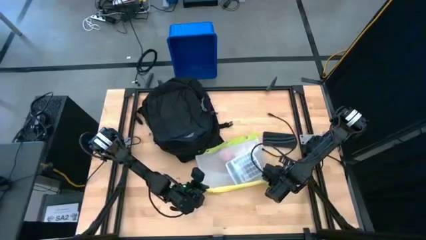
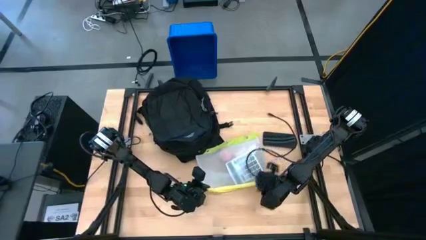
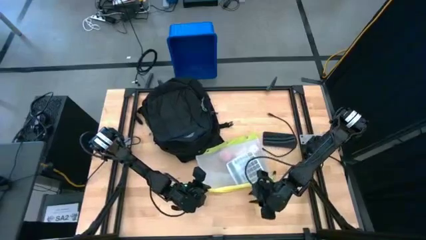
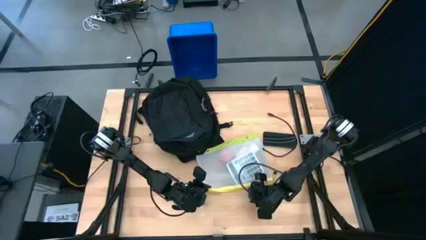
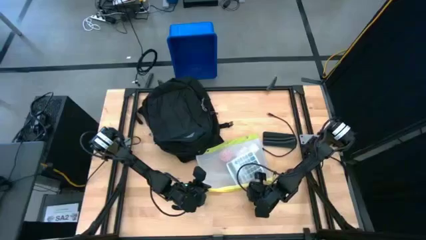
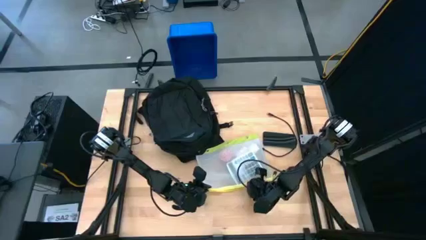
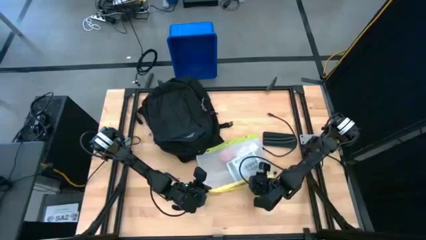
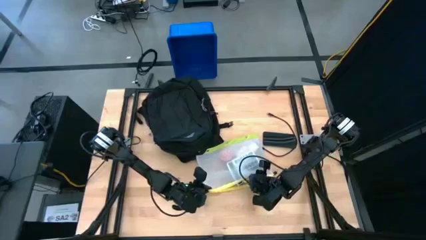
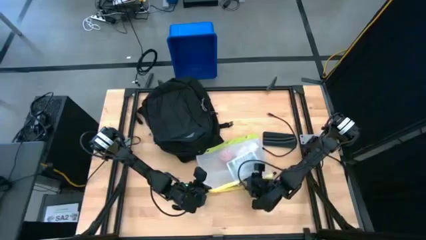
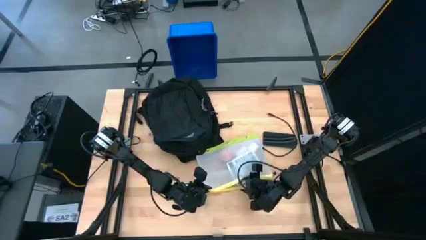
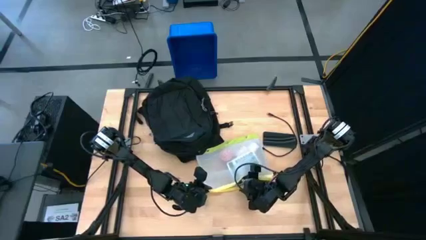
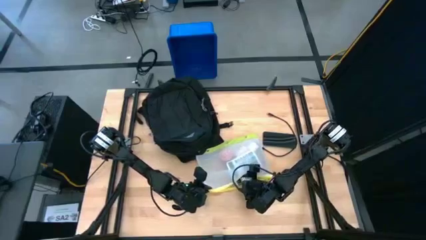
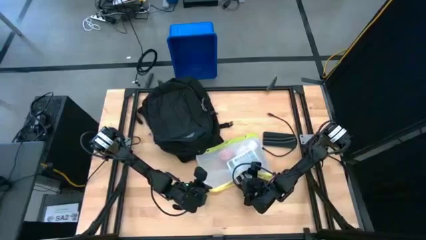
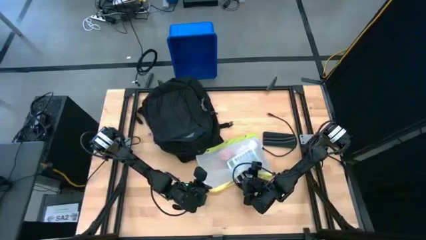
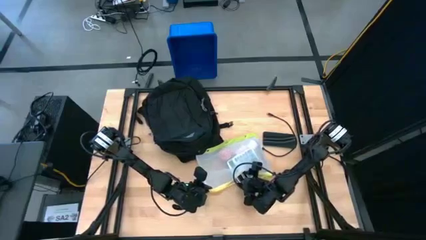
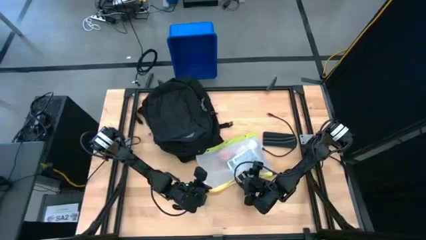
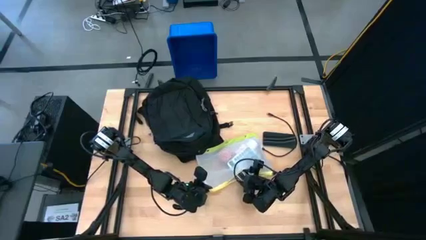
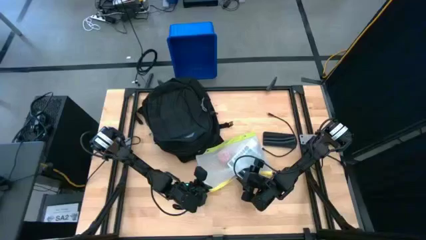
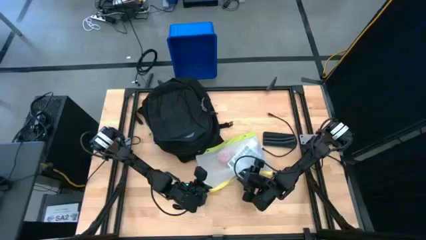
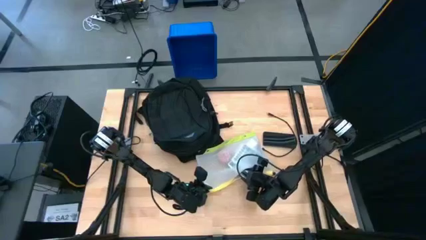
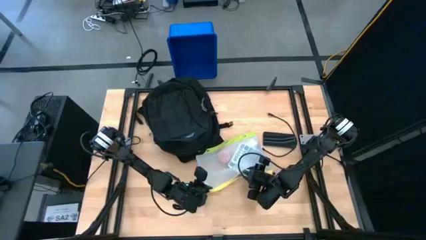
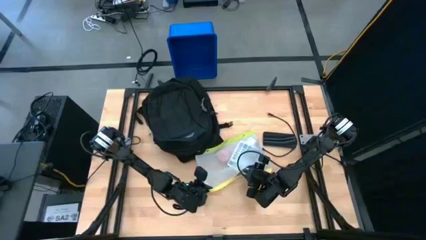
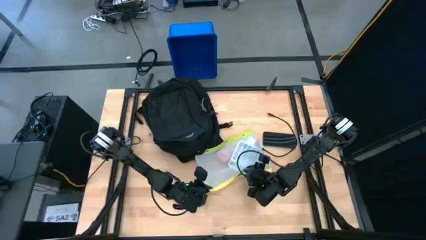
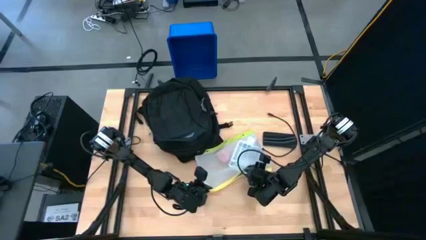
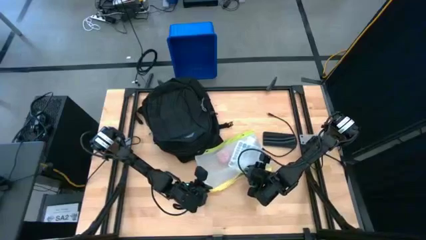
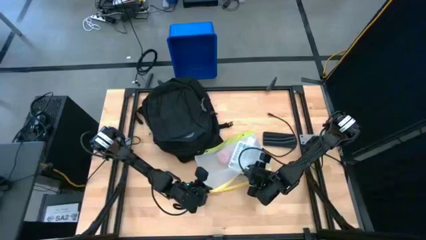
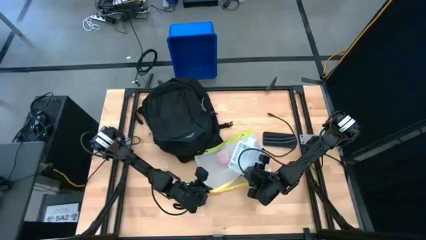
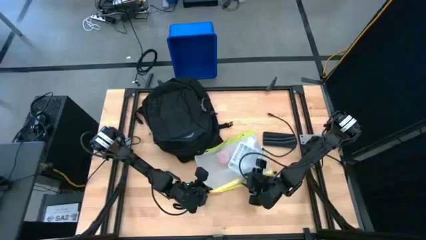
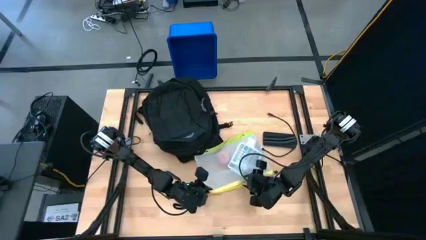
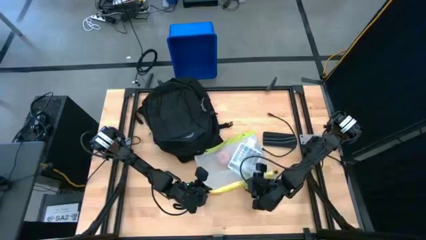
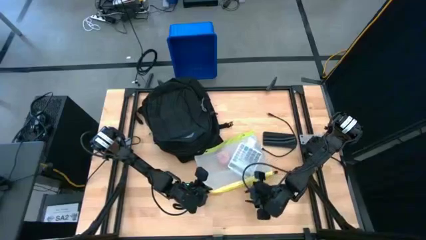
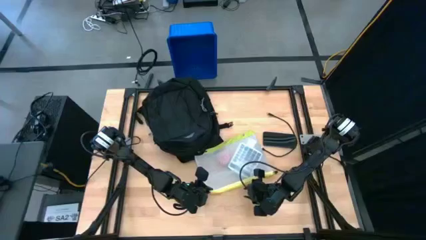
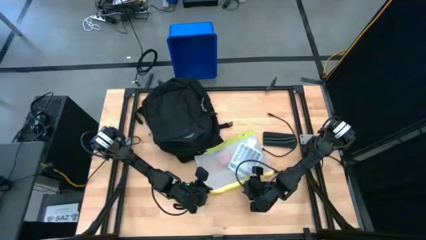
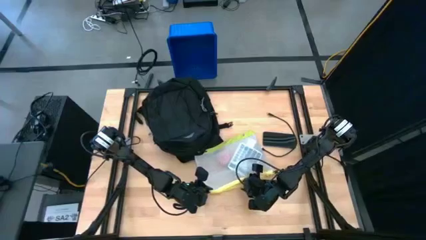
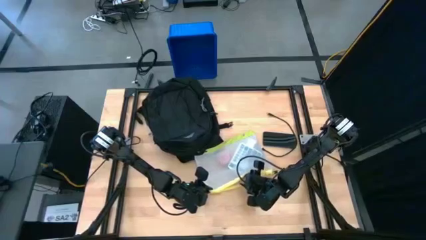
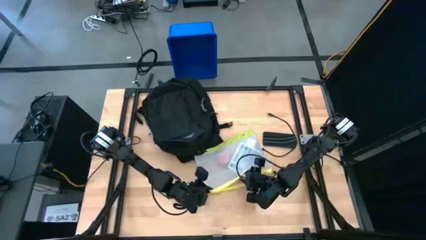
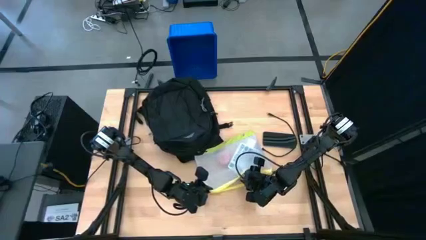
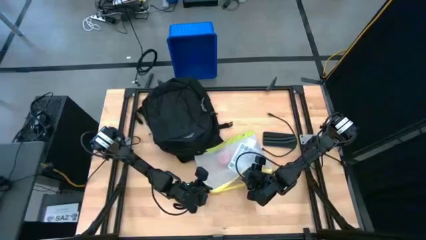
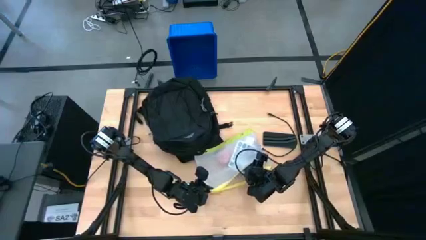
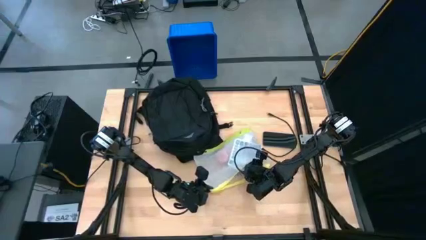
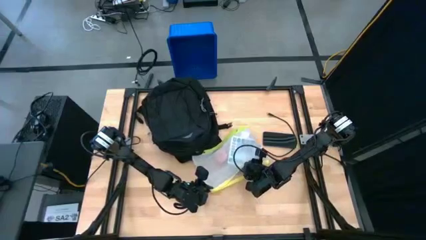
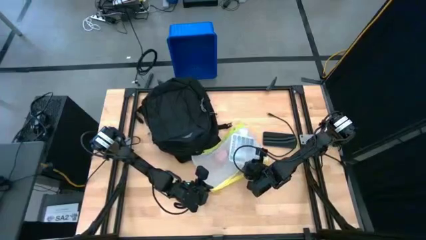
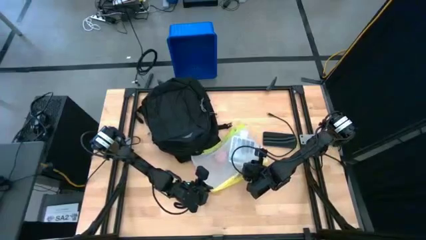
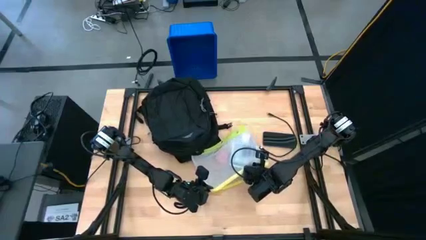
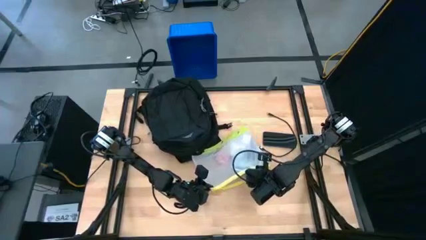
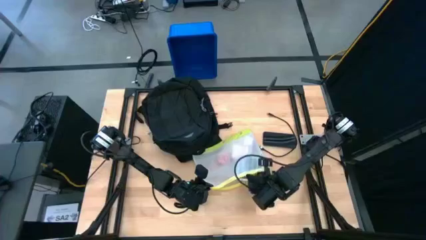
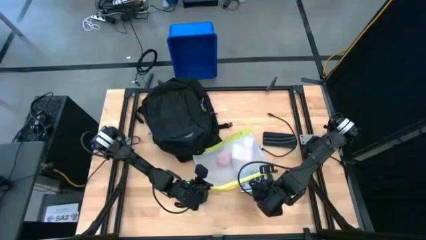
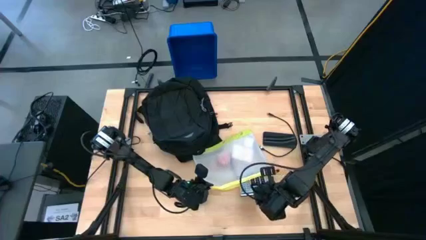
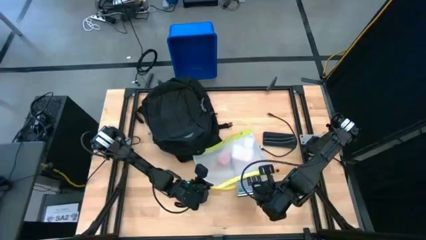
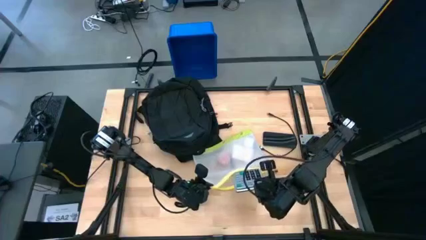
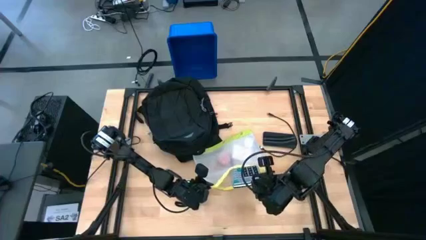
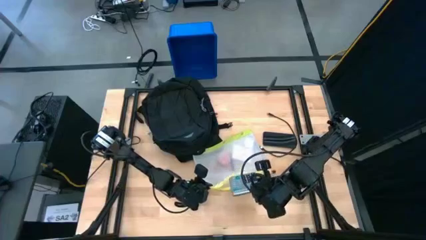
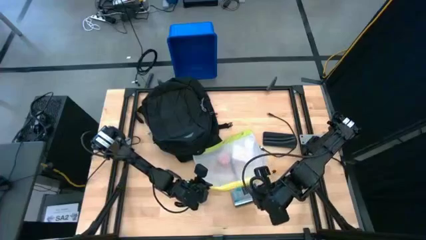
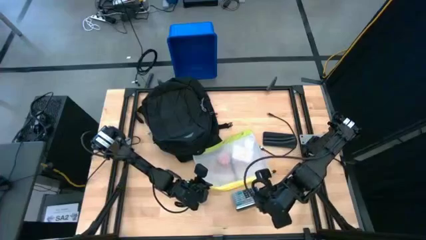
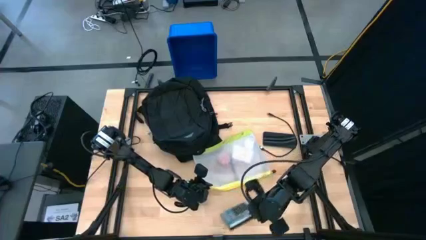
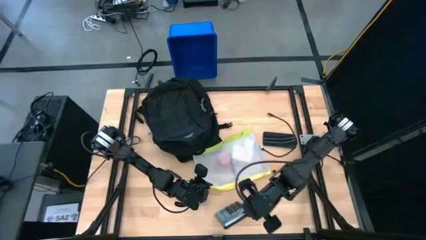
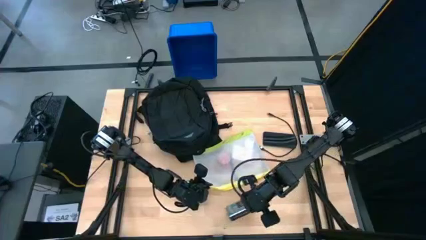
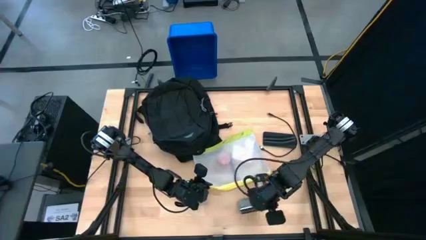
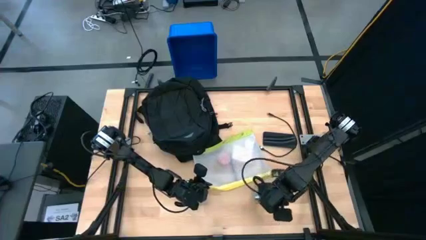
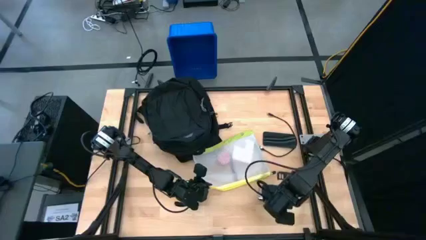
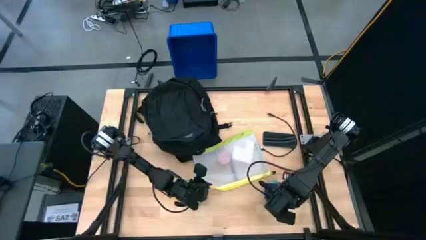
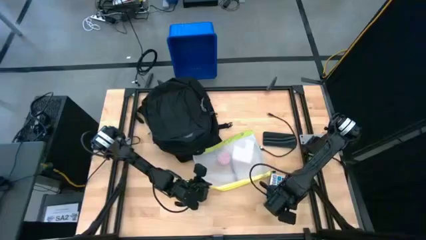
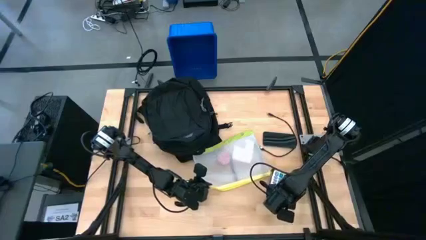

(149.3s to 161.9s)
Task: Unpack backpack
Remove the calculator from the zip lock bag

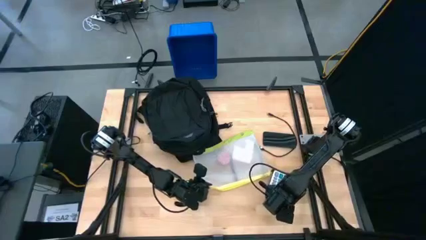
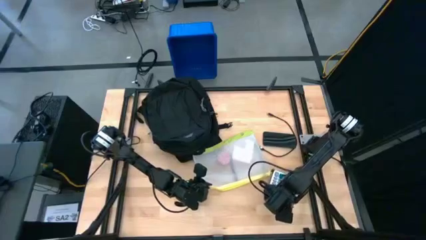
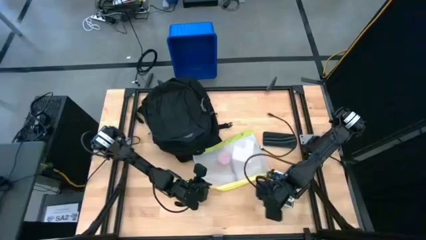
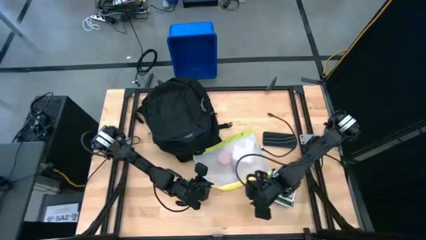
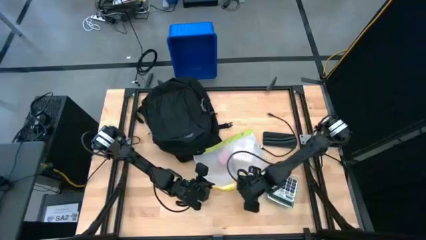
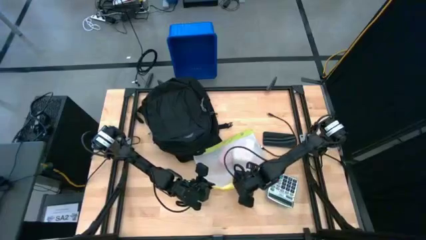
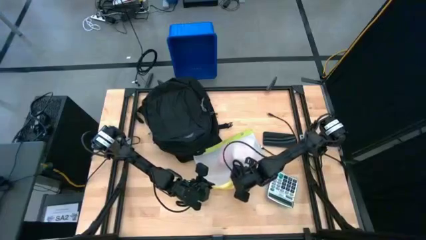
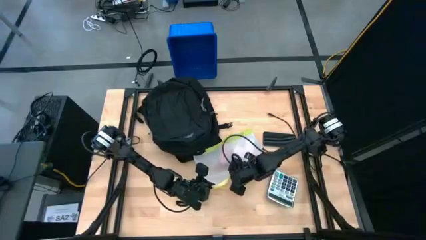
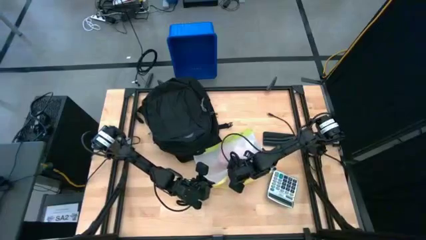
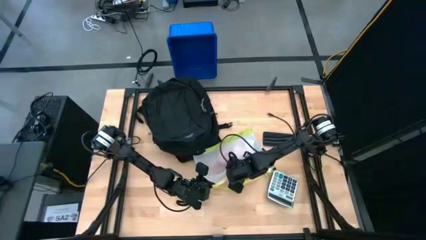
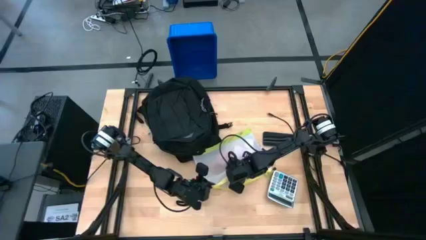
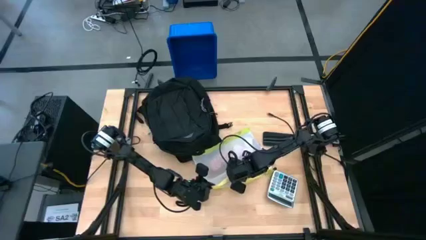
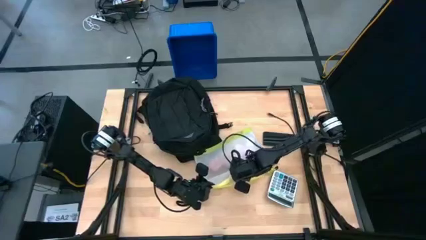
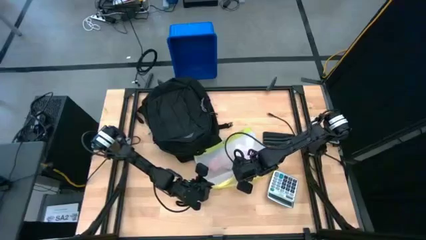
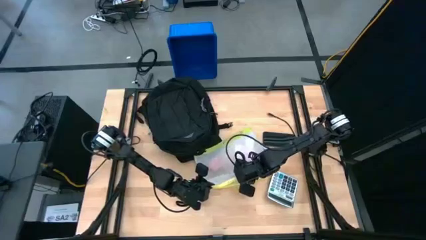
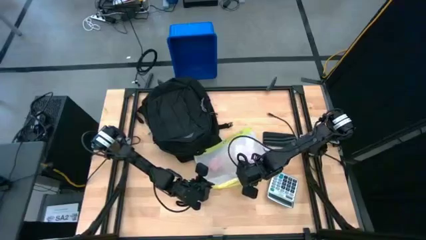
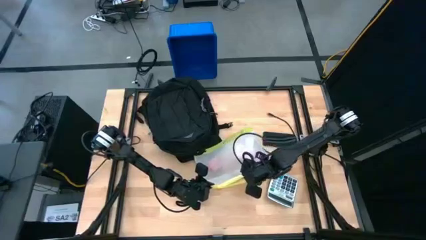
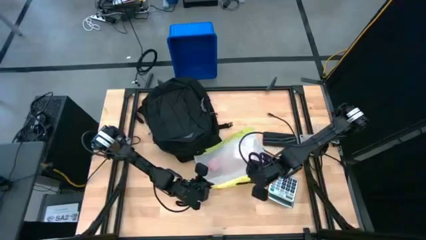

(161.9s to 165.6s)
Remove the ballpen from the zip lock bag

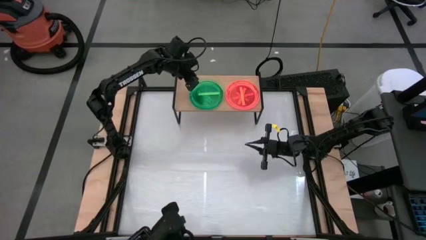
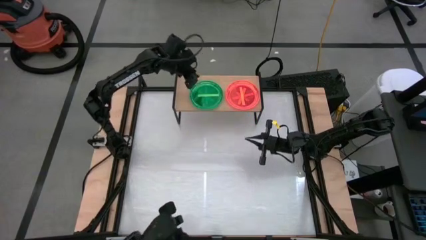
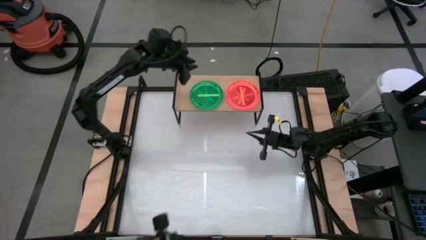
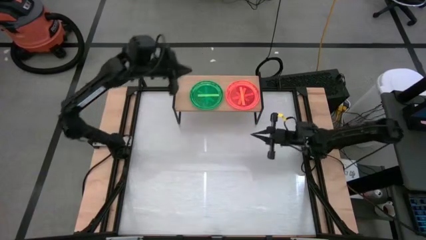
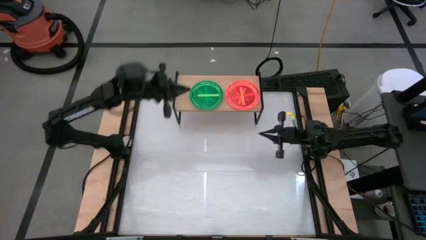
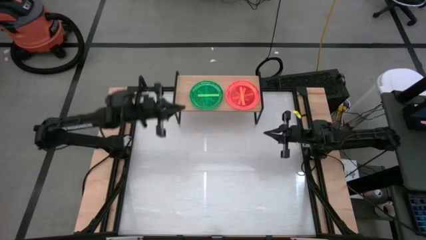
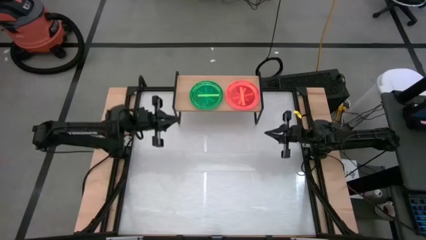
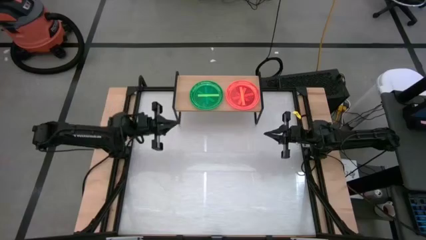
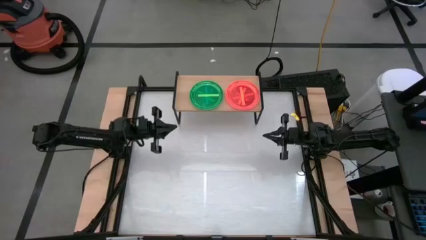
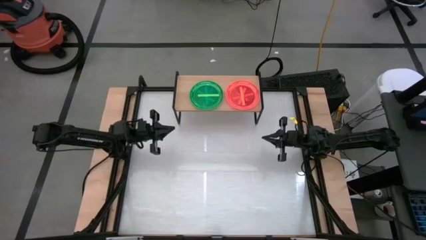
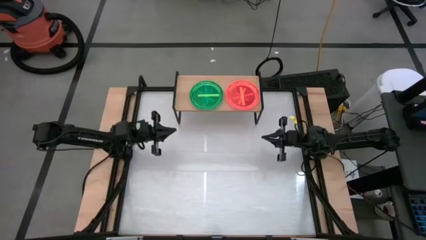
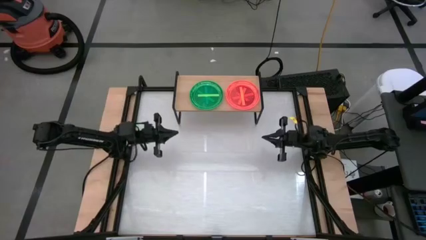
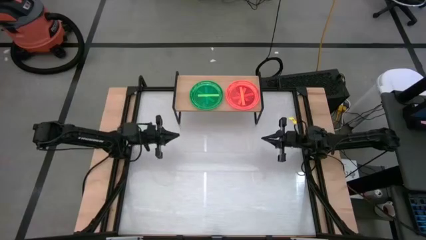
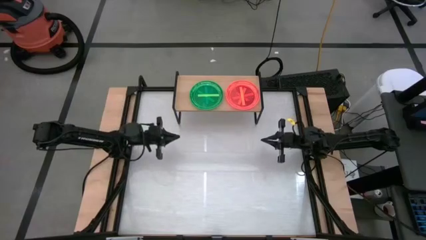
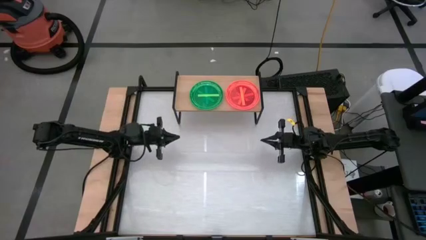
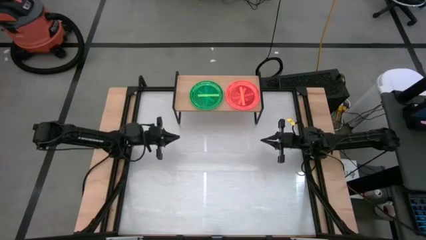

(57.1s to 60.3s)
Task: Place and stack plates onto a shelf
Return to Home Position
